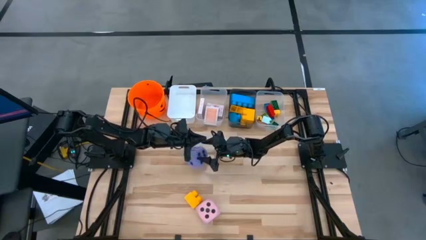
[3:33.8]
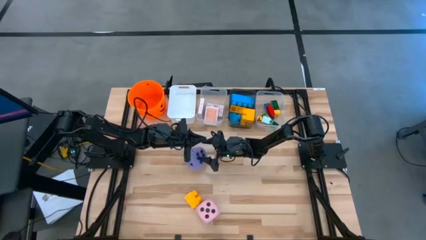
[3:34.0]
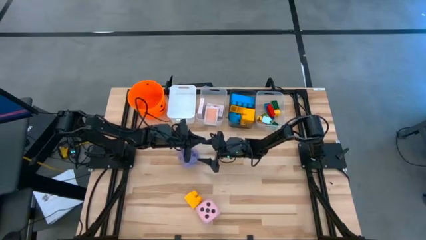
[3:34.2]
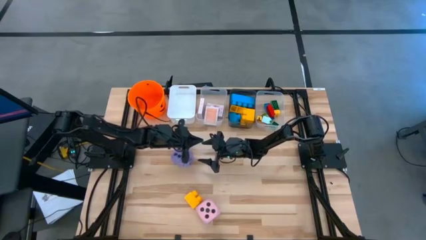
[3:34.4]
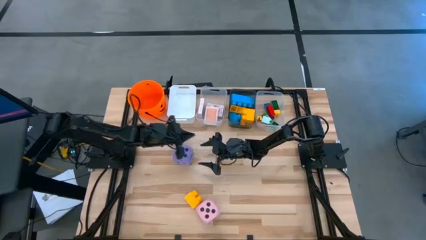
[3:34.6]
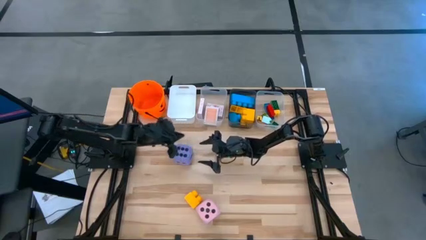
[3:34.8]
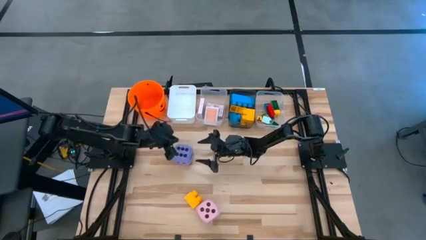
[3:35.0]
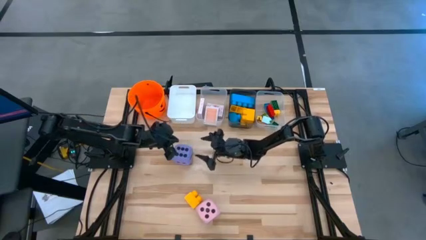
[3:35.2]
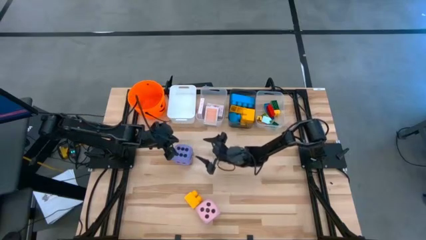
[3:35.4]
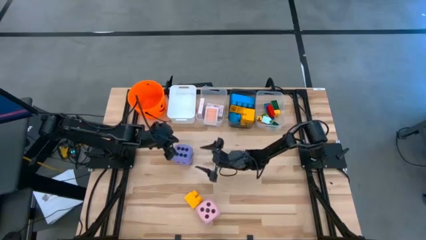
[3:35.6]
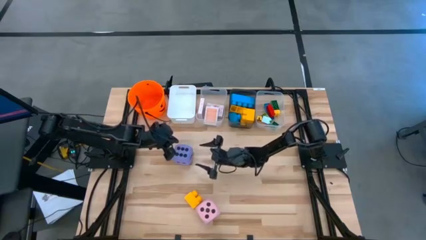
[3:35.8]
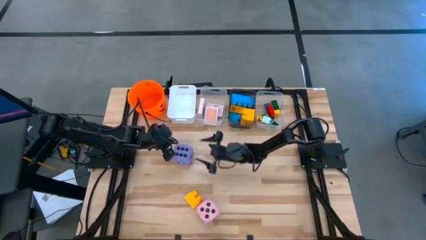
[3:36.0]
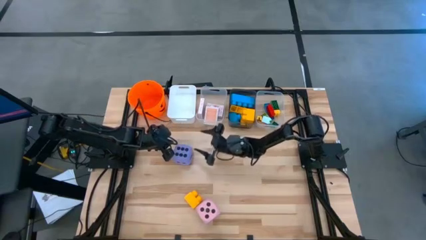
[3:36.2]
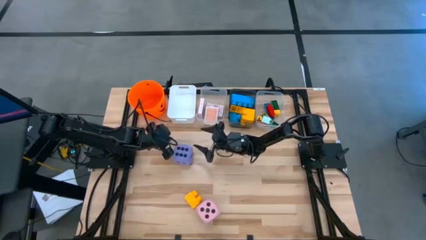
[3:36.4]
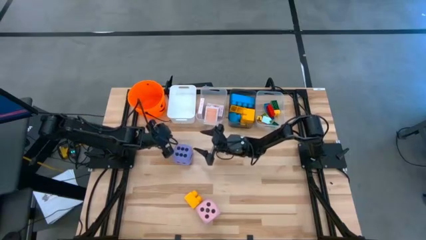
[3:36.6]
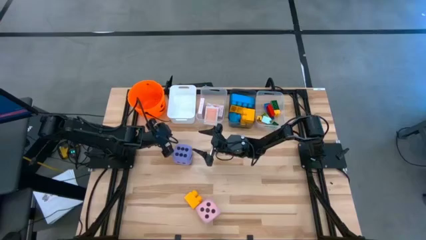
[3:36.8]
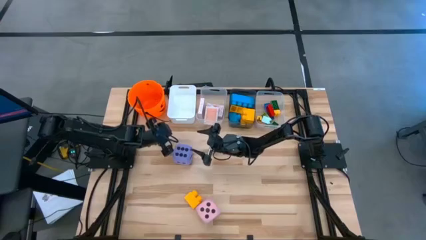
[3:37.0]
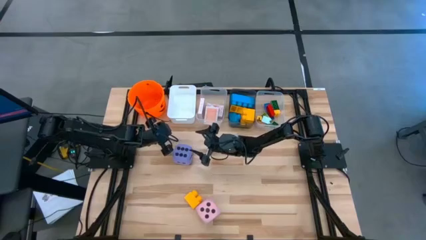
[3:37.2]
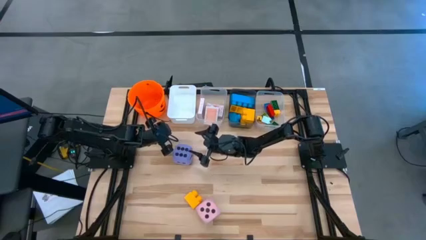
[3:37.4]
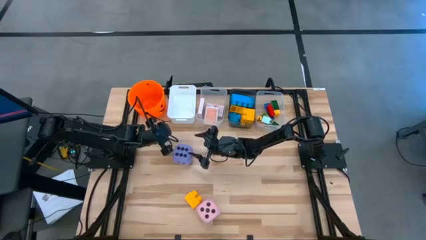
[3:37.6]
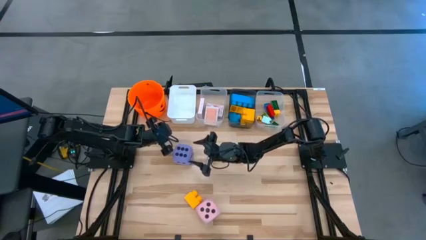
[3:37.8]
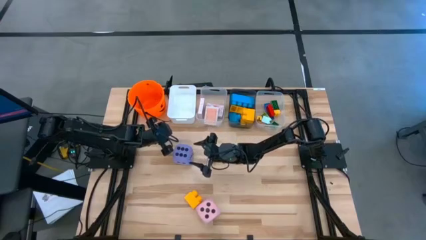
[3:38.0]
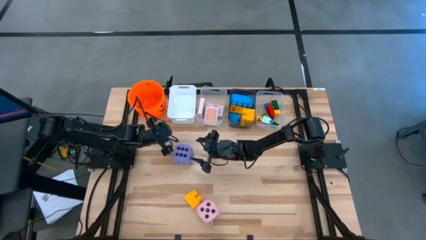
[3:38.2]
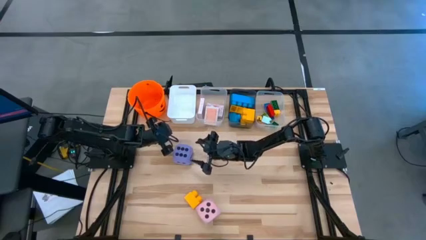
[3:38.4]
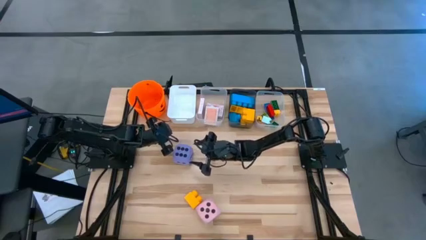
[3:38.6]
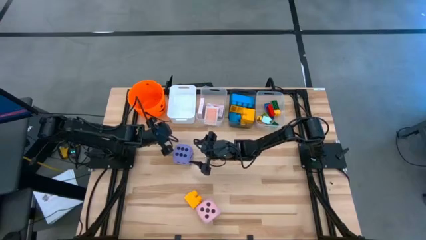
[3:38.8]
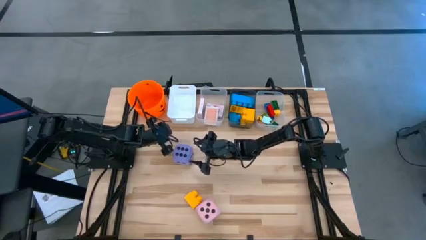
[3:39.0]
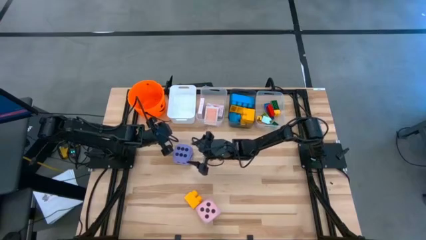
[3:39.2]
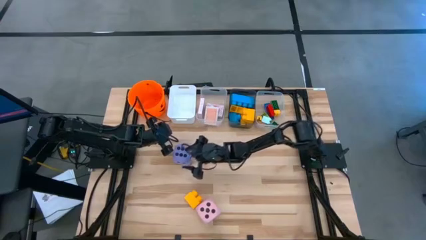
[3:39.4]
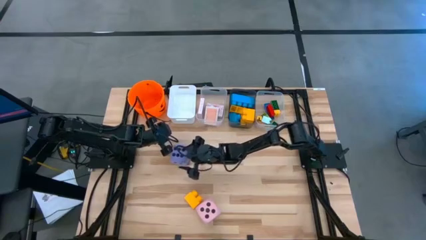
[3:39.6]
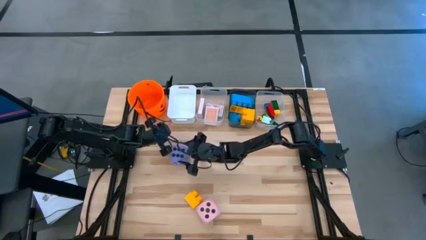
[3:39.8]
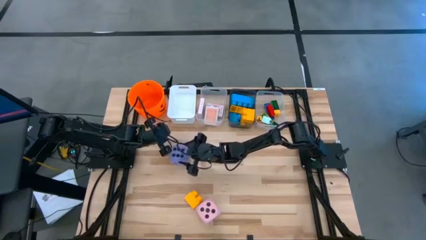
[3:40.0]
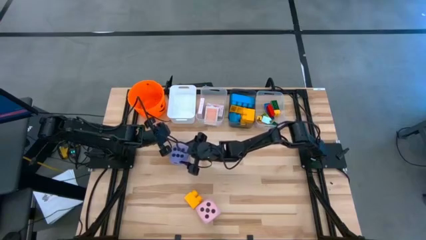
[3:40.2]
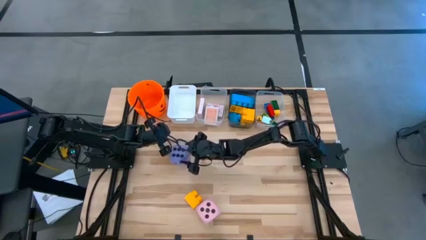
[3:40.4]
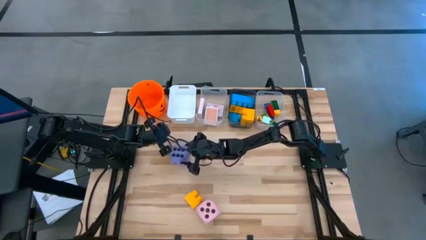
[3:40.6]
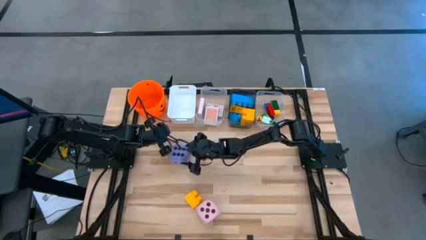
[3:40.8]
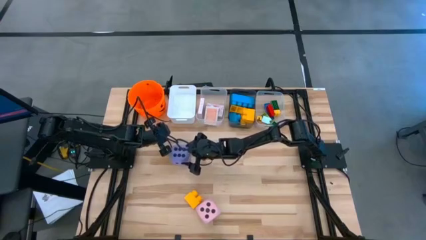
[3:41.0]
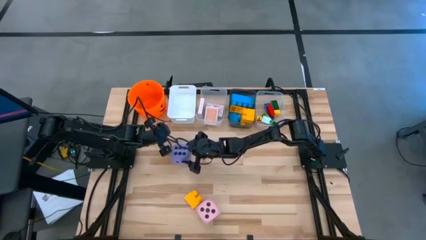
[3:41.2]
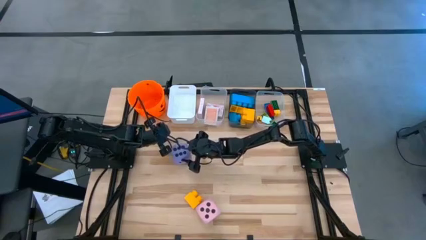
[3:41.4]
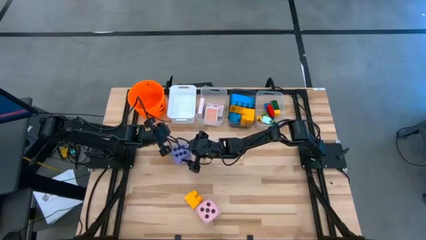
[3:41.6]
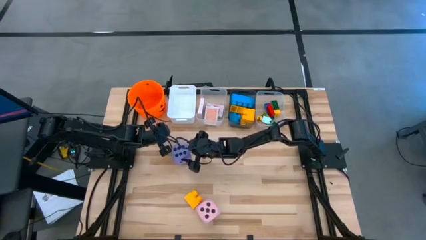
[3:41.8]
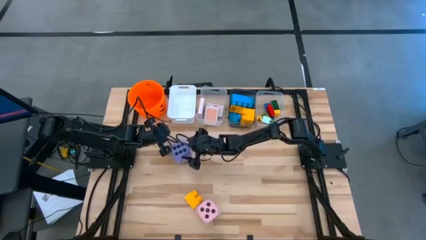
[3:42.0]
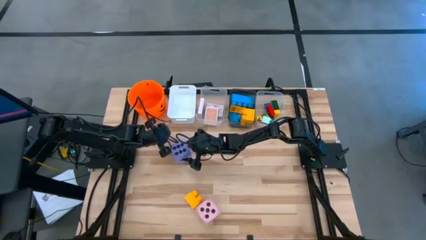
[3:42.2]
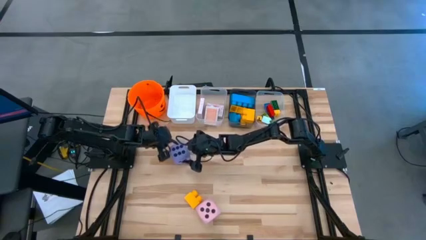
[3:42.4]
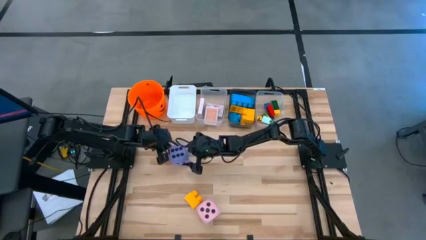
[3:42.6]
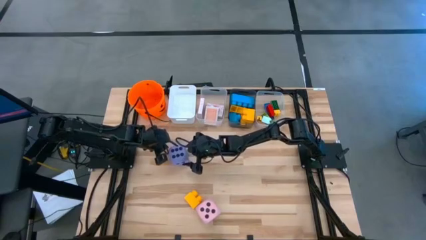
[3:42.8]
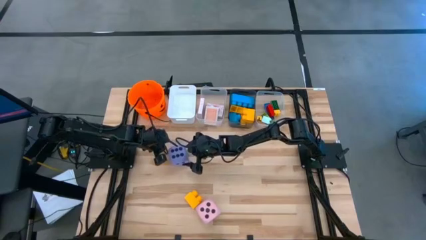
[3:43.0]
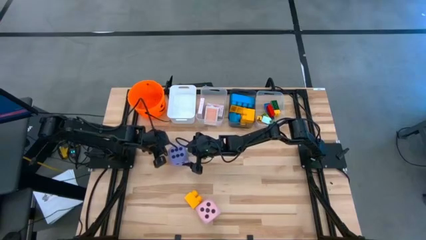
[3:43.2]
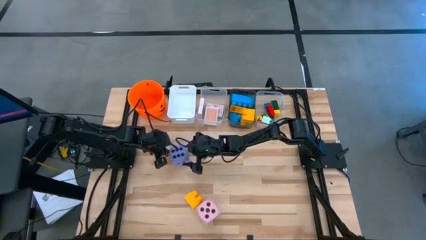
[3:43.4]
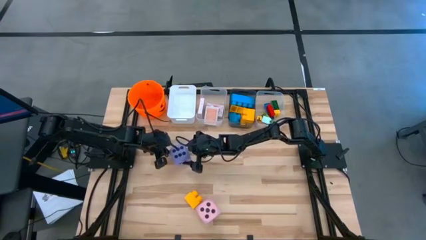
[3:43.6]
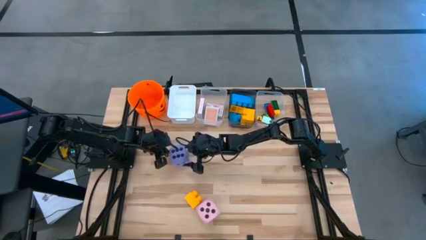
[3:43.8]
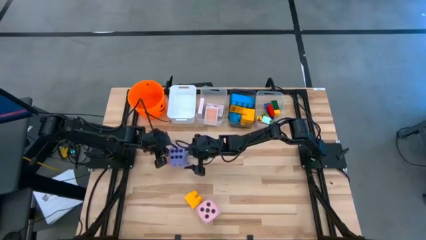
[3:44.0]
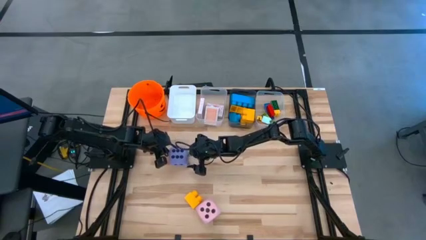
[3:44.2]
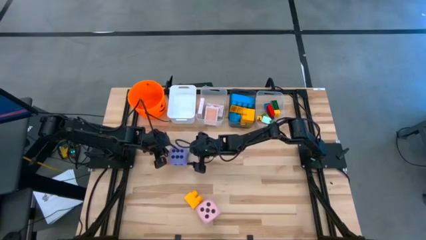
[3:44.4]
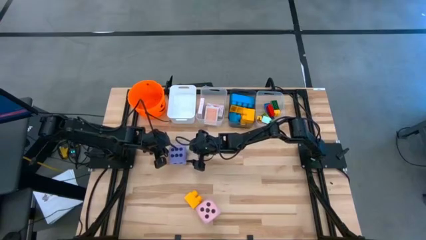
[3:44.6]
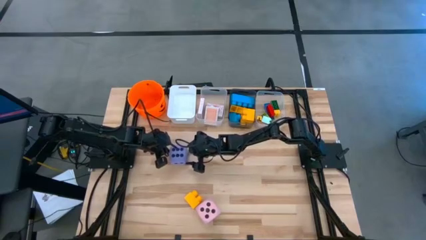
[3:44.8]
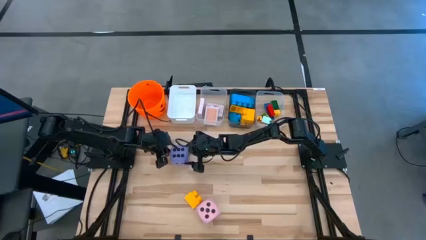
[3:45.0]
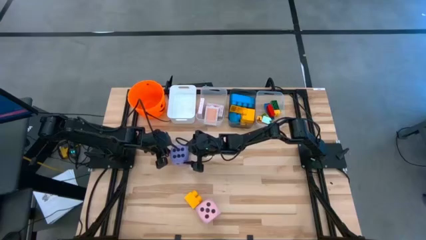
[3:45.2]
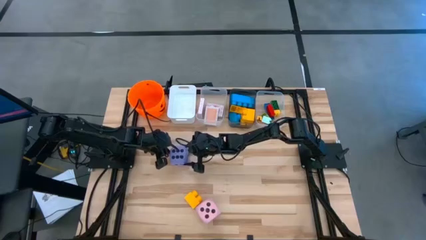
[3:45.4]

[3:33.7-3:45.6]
Task: Pick & Place Toys
Put the purple die into the white bin

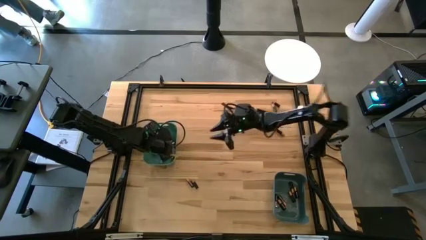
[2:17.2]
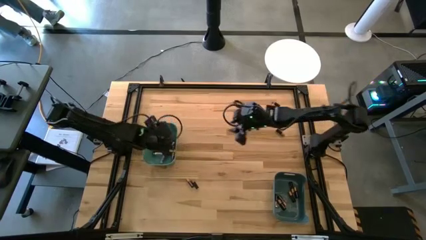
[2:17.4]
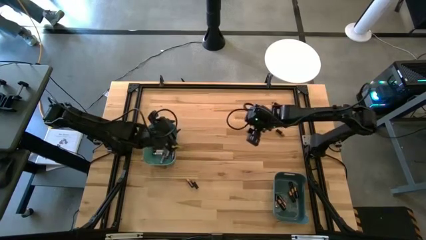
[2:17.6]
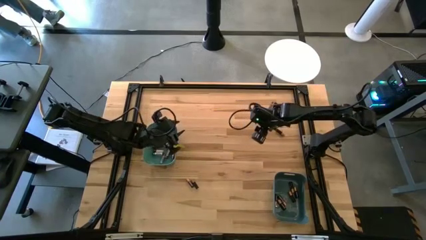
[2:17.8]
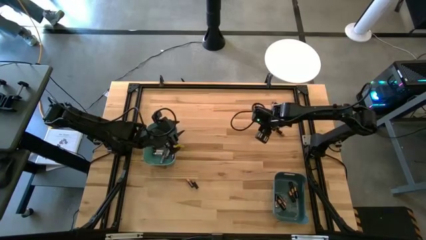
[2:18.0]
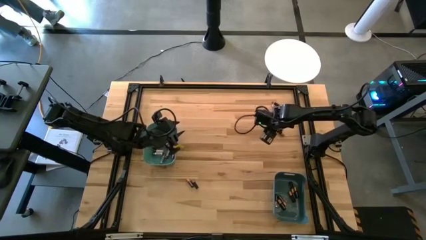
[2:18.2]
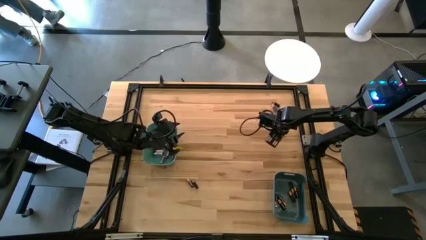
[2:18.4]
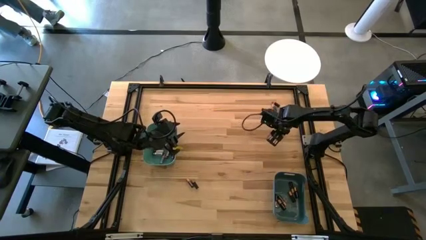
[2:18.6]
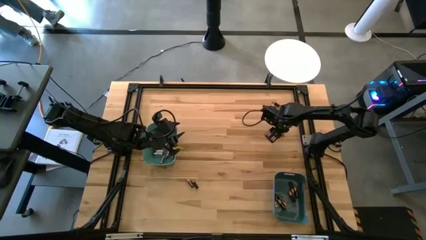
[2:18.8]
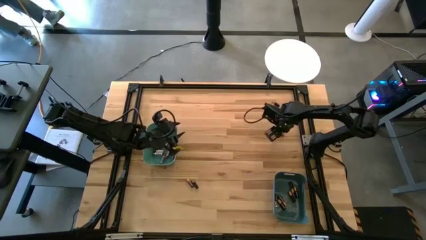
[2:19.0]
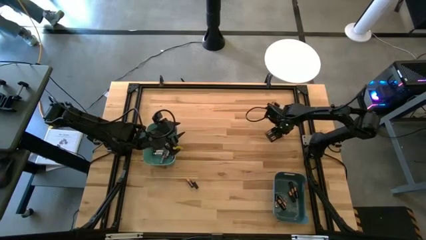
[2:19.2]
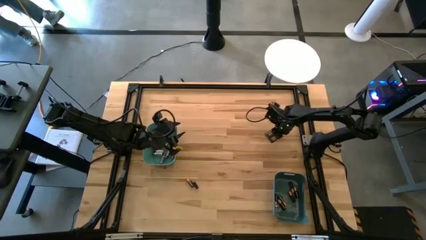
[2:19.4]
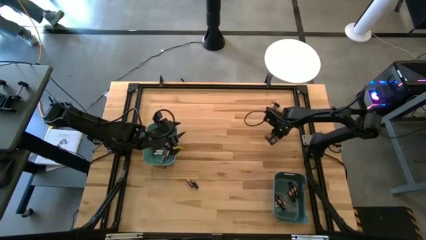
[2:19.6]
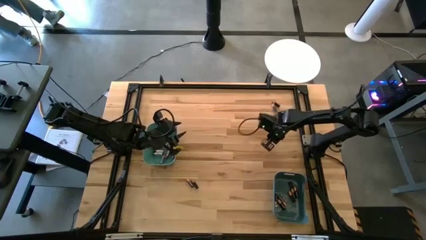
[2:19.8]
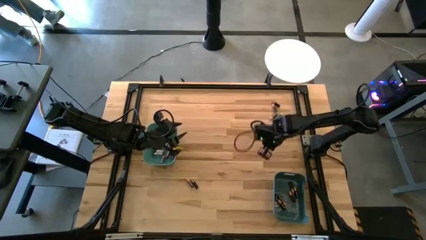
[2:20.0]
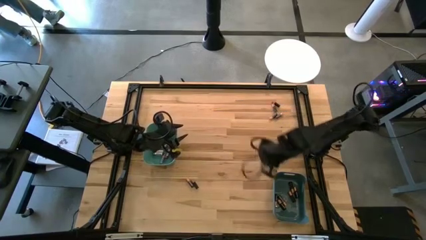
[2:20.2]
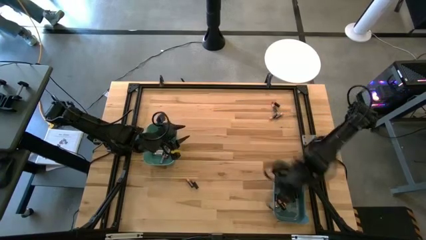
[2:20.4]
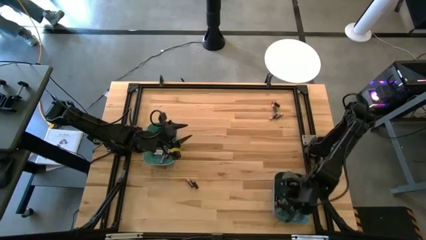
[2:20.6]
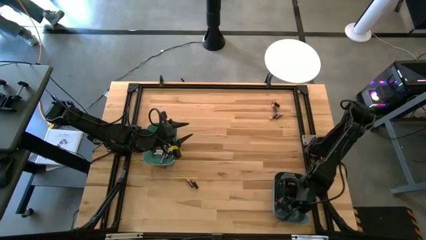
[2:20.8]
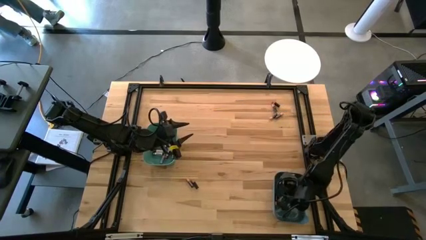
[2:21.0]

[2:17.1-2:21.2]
Task: Sort batteries
Put the black battery into the blue bin

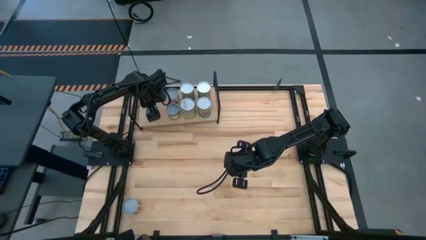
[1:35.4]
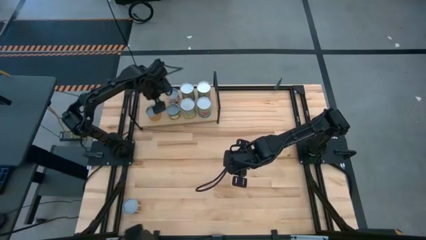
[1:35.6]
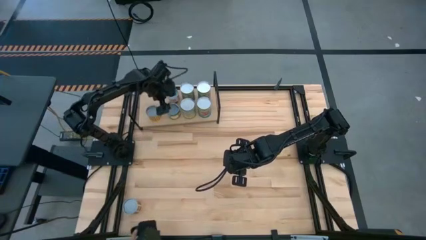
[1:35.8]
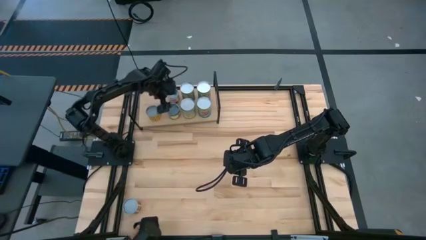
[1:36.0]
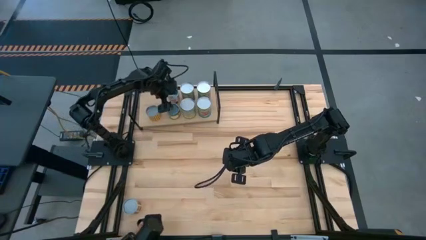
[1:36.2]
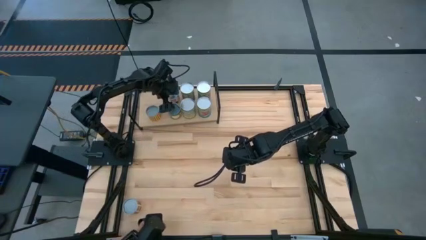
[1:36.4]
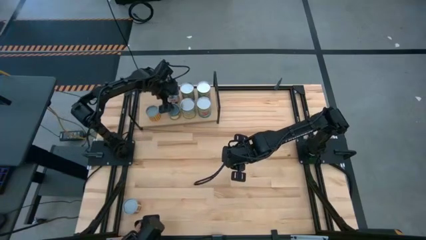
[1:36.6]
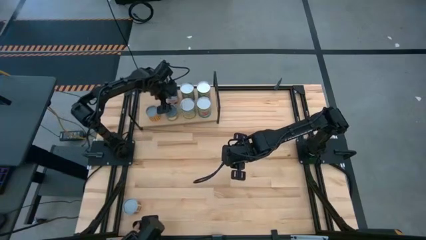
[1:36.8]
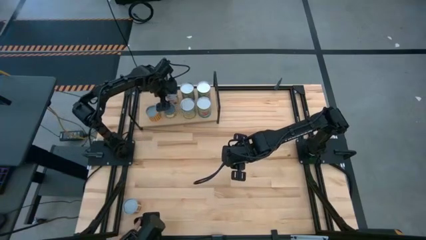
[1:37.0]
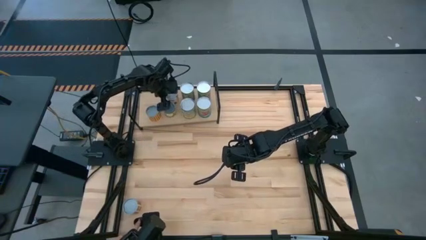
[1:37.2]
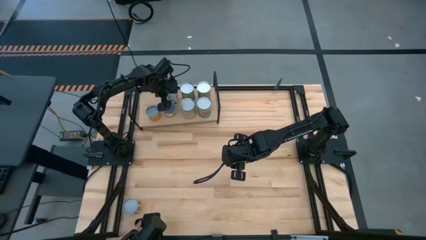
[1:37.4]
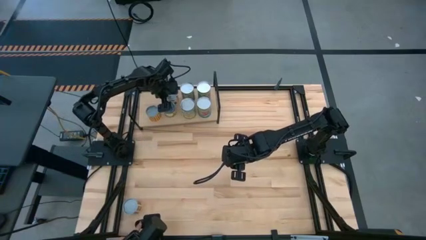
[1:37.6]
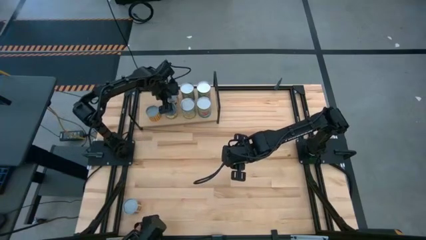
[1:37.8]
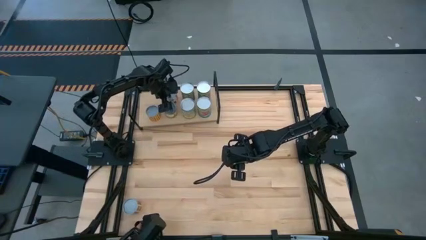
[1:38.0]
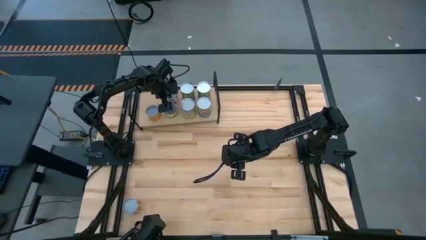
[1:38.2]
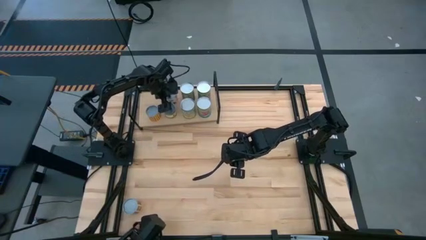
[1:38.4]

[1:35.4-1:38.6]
Task: Pick and place cans onto a shelf
Adjust the canned goods on the shelf
